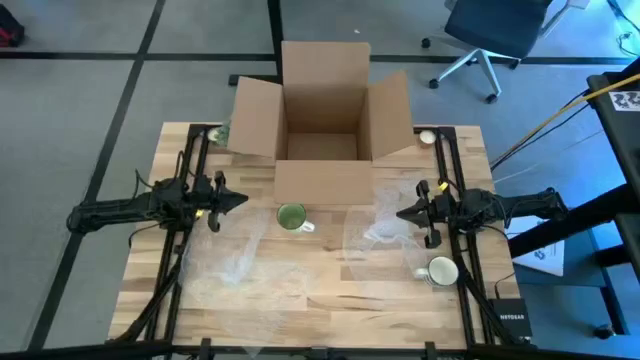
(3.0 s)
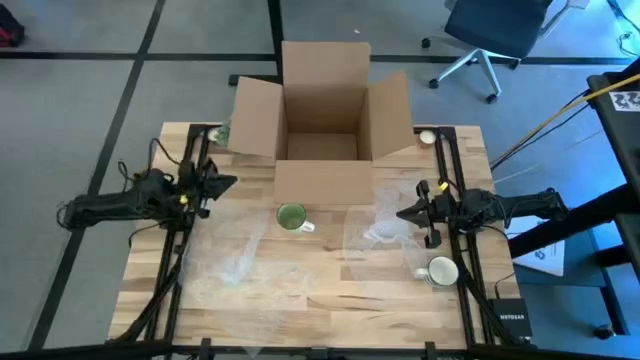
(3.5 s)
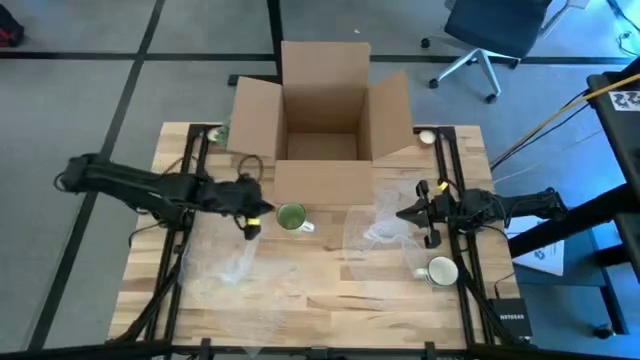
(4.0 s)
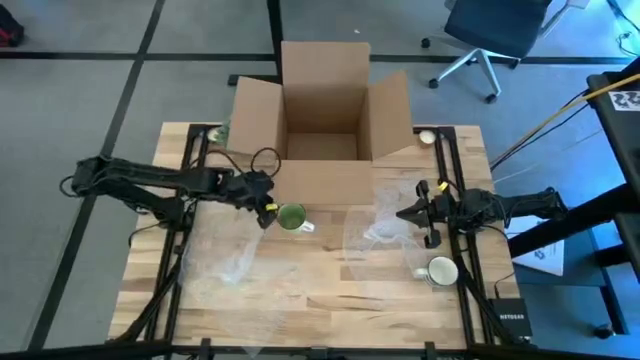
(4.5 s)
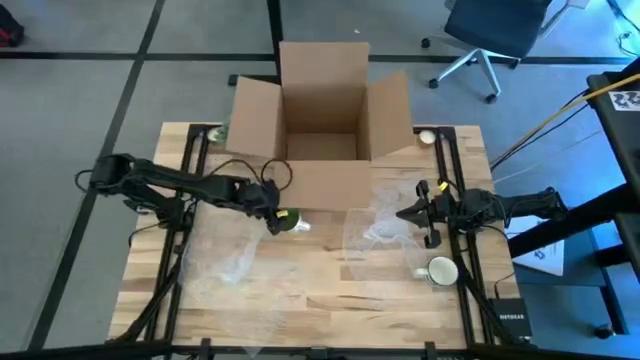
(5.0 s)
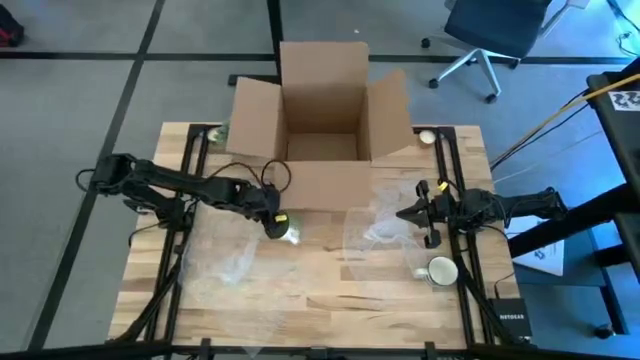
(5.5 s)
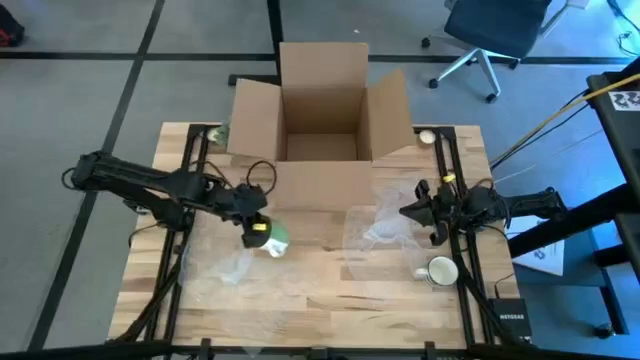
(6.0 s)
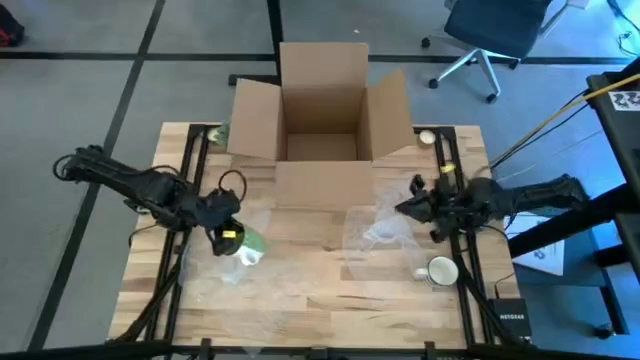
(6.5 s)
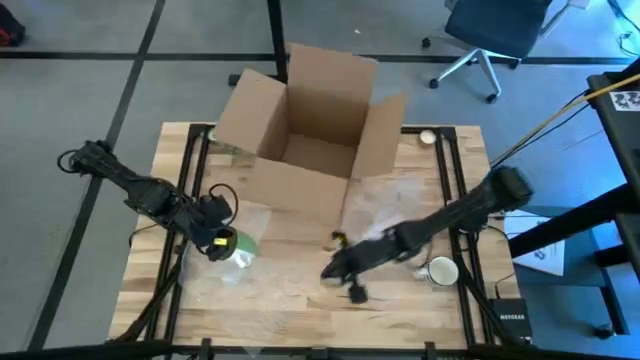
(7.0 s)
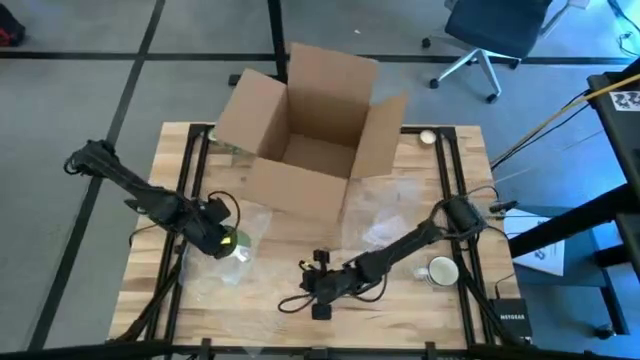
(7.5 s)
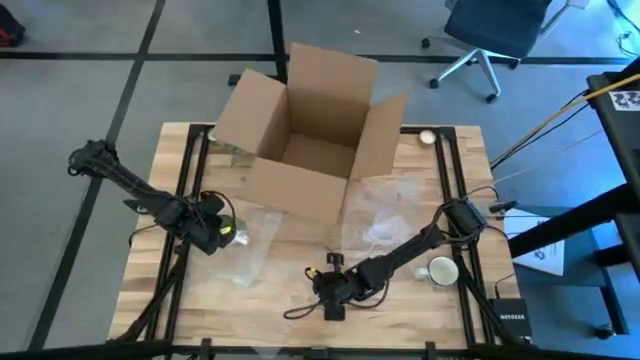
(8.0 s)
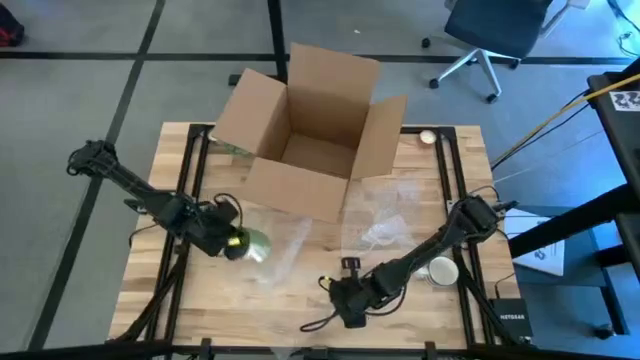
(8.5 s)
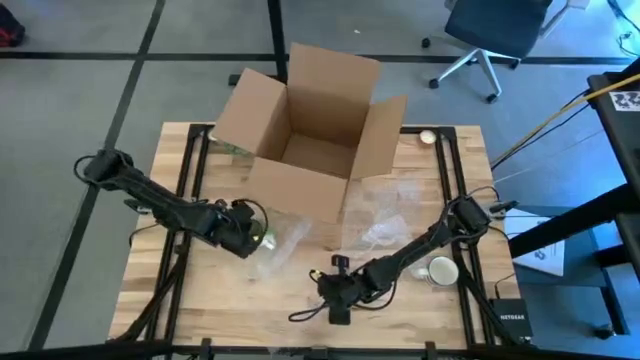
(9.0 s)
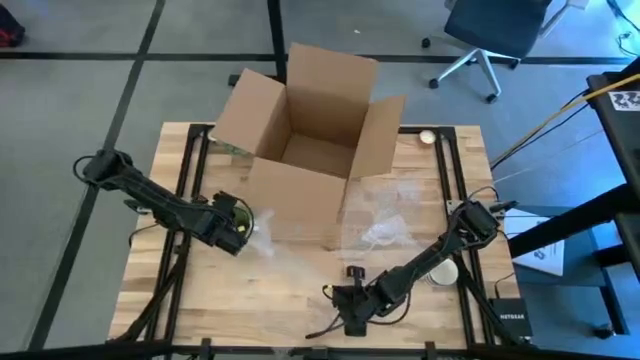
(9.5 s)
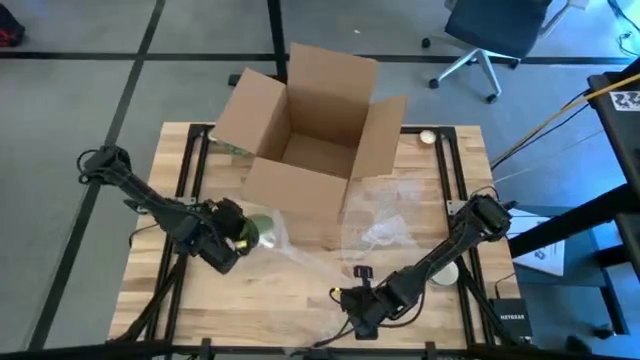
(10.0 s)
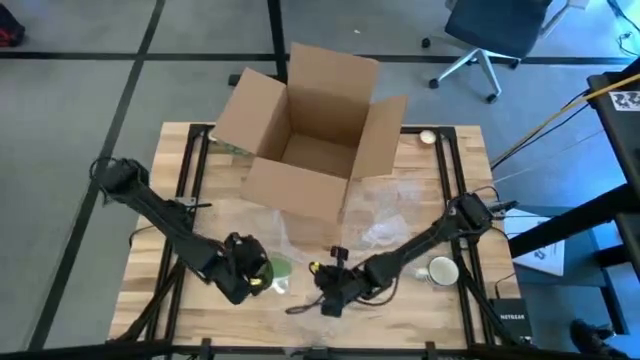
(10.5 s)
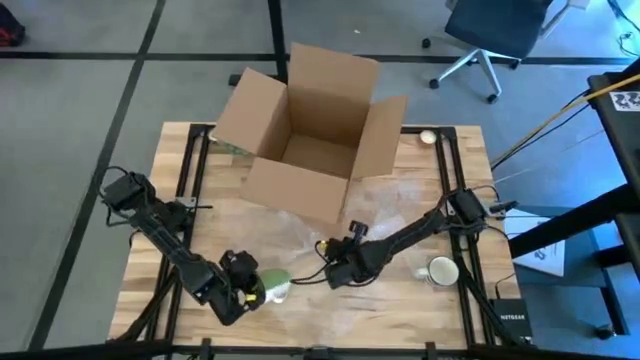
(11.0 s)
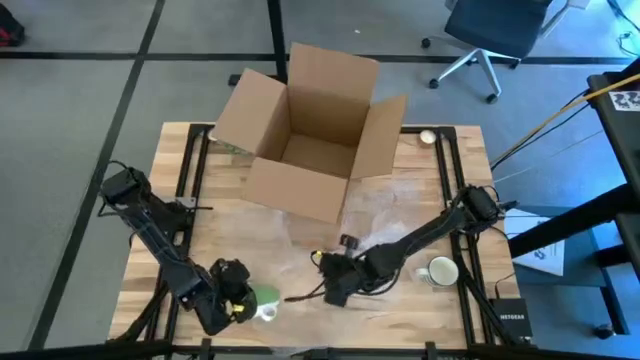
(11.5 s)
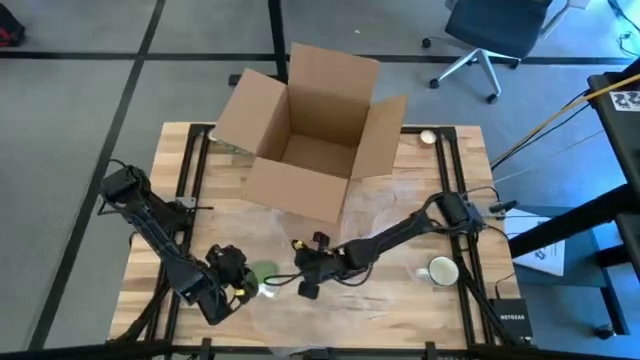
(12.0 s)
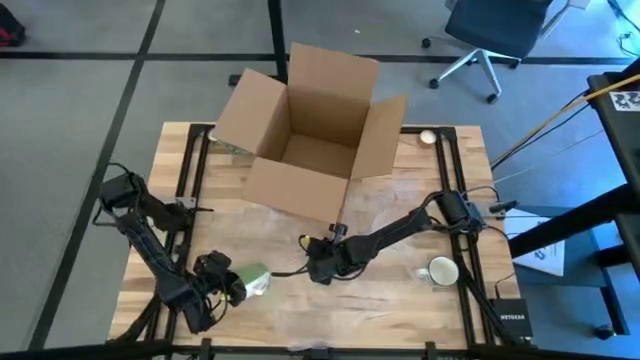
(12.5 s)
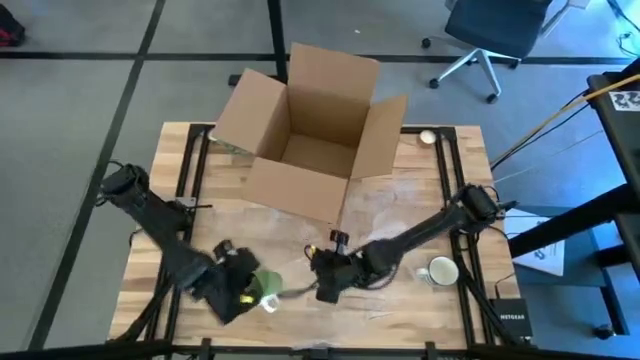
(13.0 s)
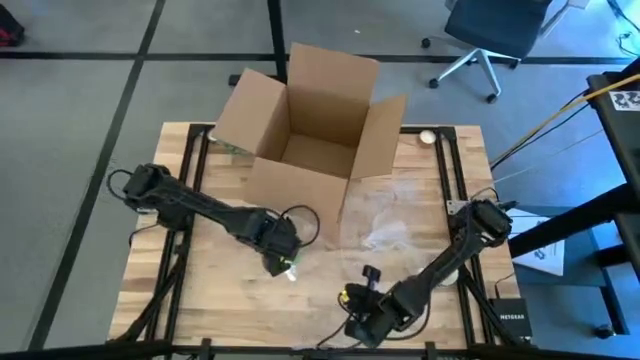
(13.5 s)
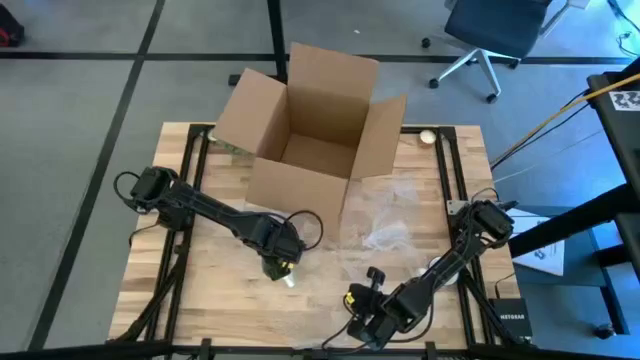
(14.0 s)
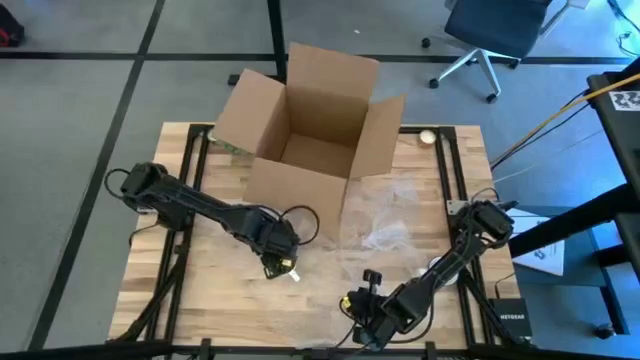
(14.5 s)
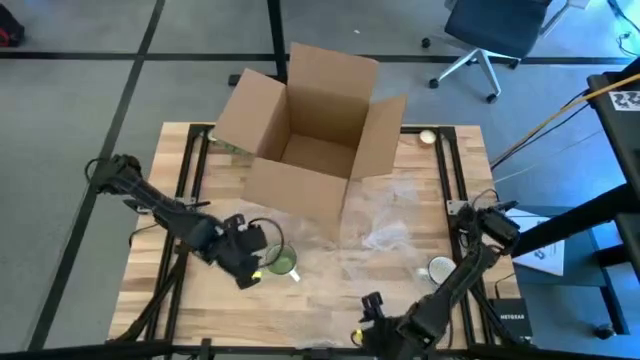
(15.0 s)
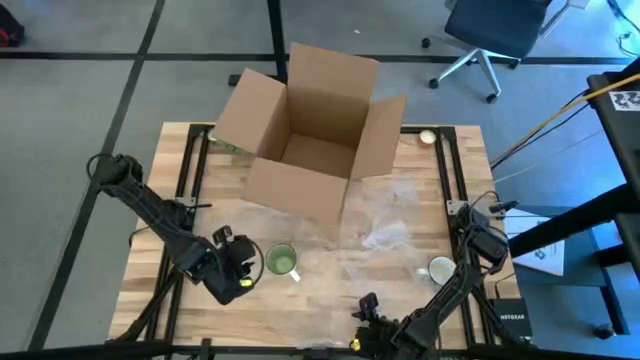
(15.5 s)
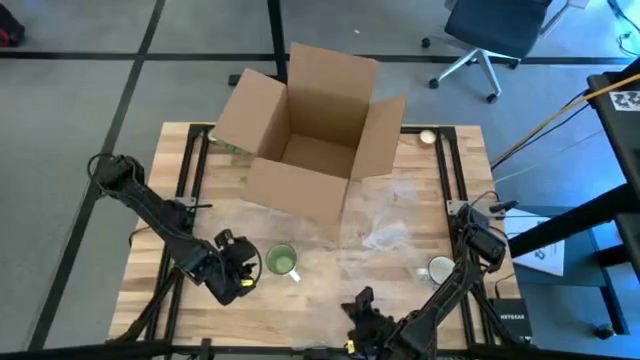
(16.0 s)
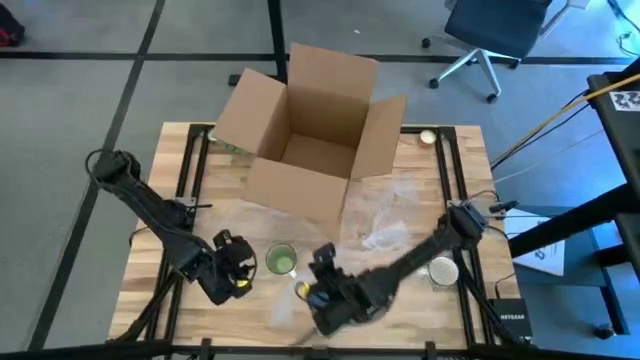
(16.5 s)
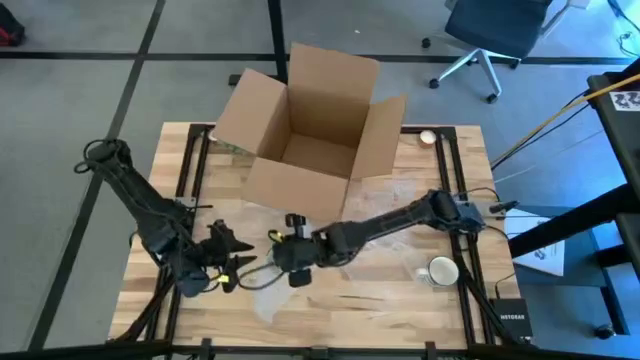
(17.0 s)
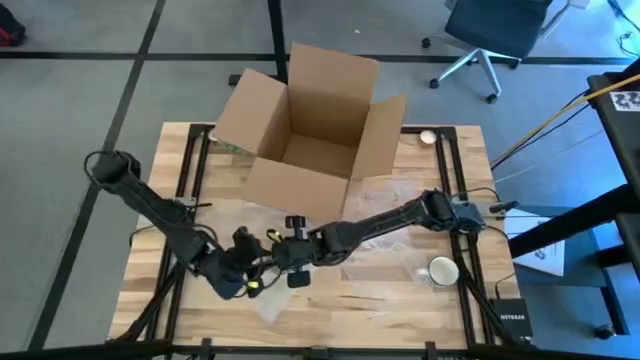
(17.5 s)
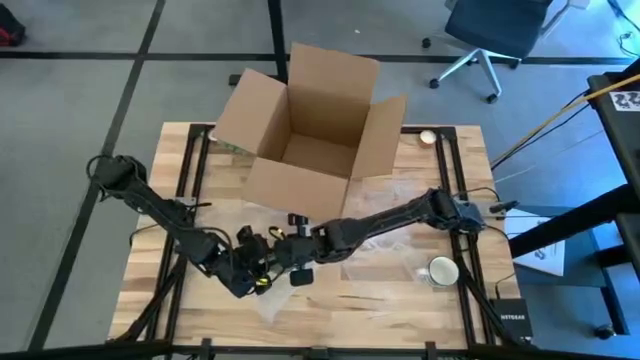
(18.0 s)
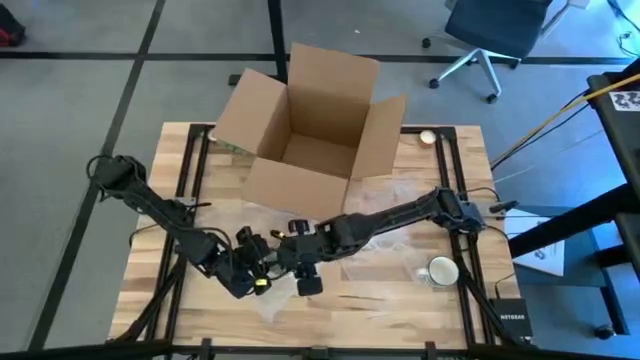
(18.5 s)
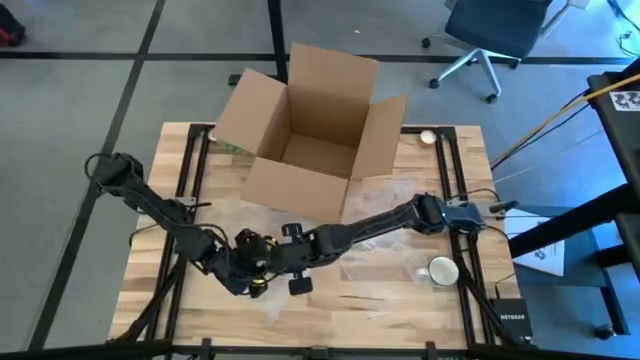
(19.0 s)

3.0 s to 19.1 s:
Task: wrap mug
Wrap the green mug with bubble wrap
